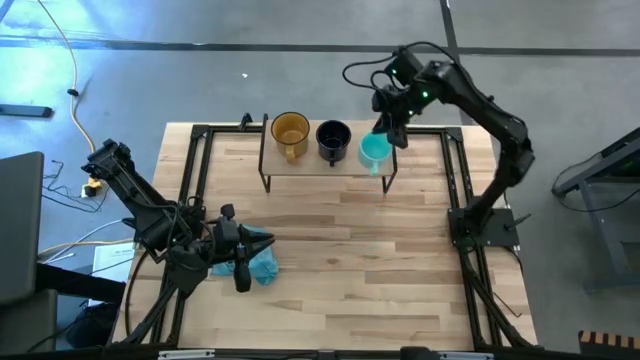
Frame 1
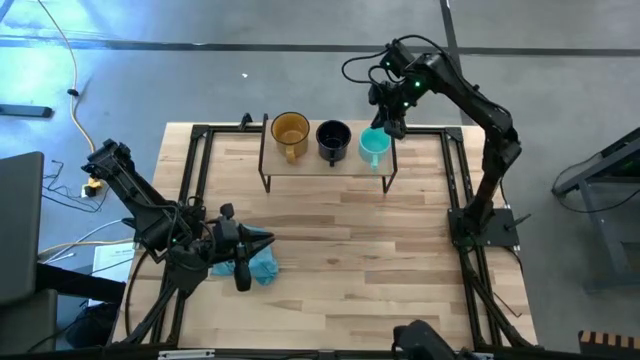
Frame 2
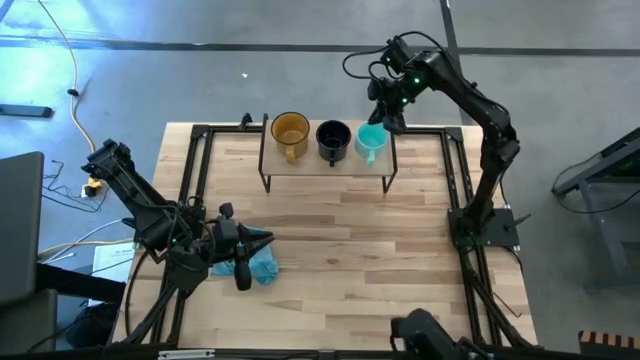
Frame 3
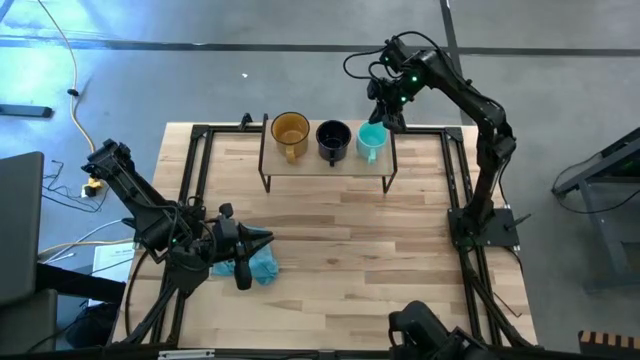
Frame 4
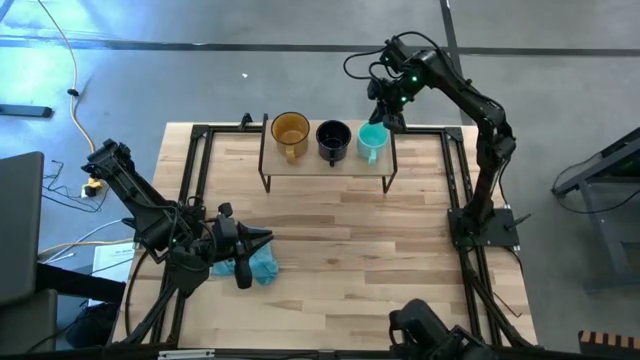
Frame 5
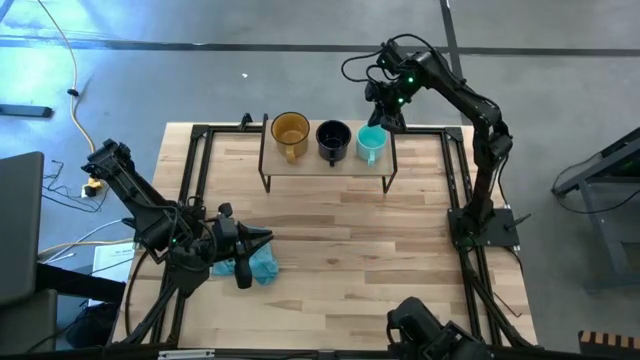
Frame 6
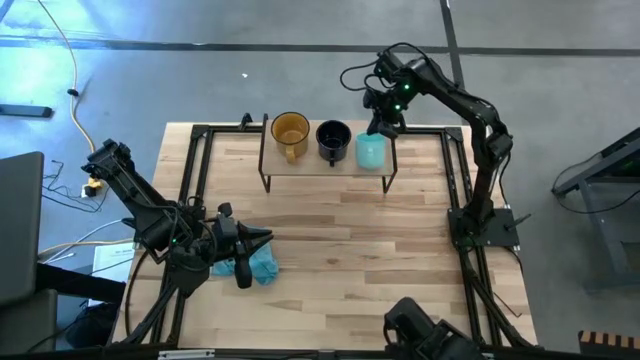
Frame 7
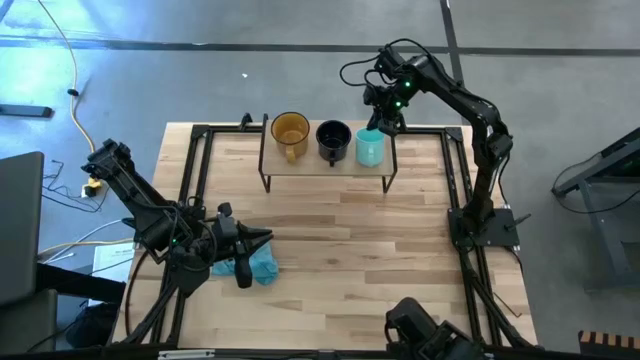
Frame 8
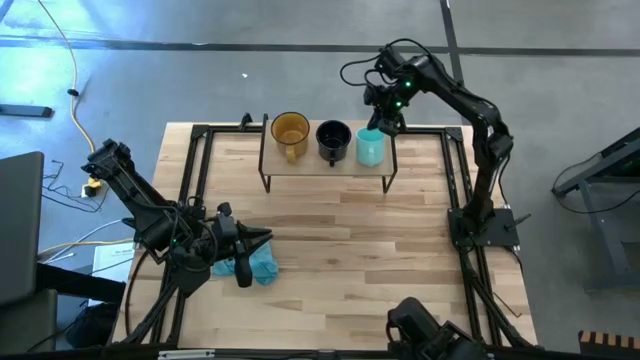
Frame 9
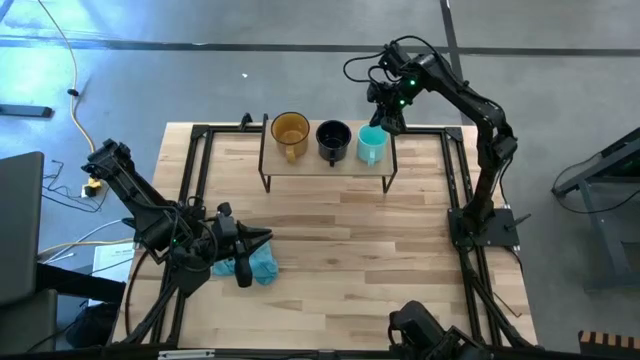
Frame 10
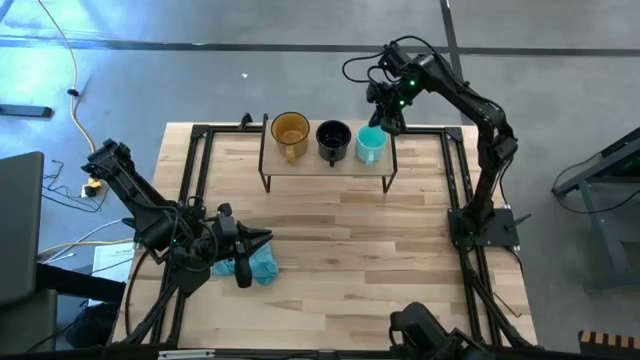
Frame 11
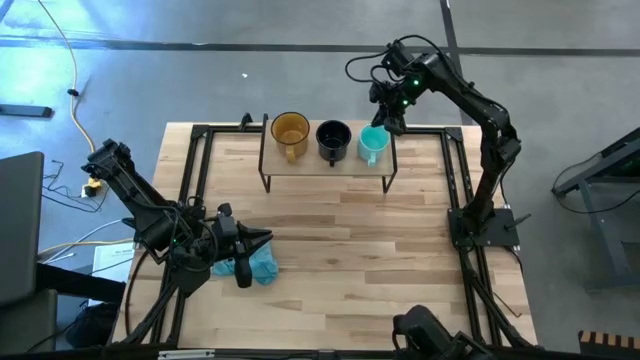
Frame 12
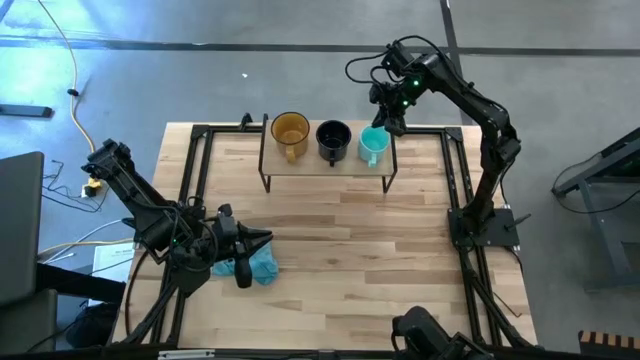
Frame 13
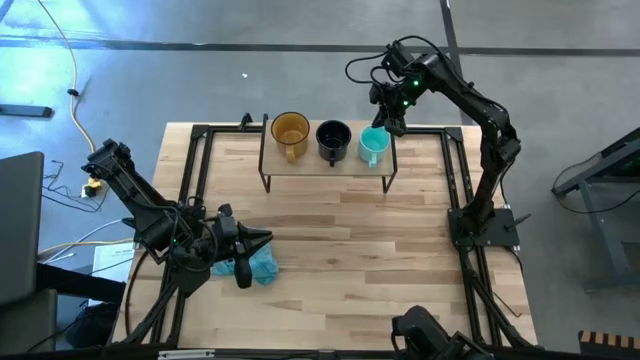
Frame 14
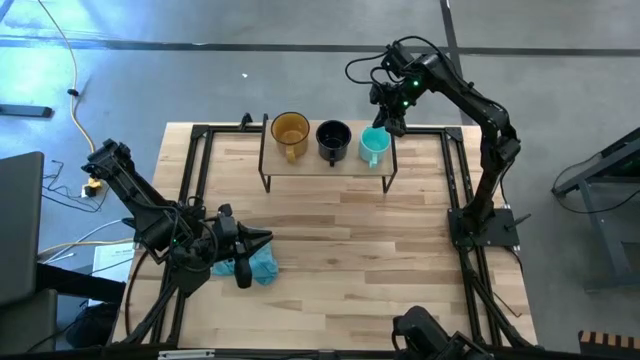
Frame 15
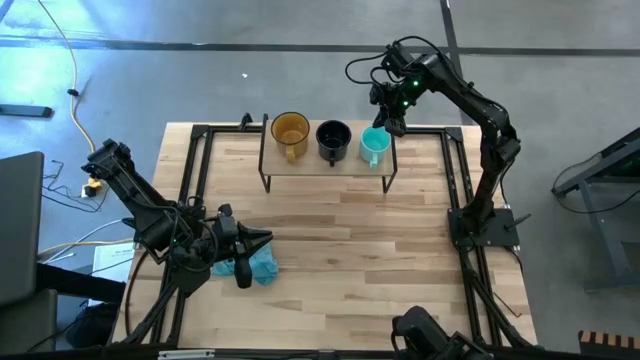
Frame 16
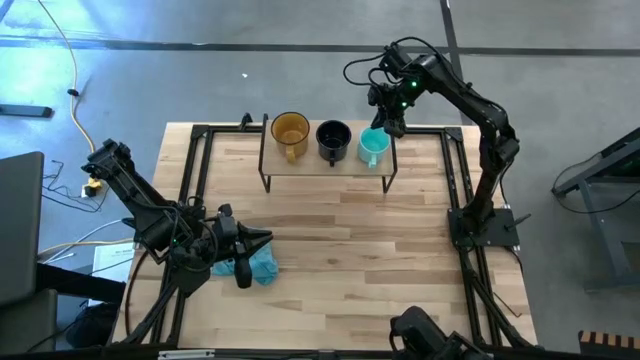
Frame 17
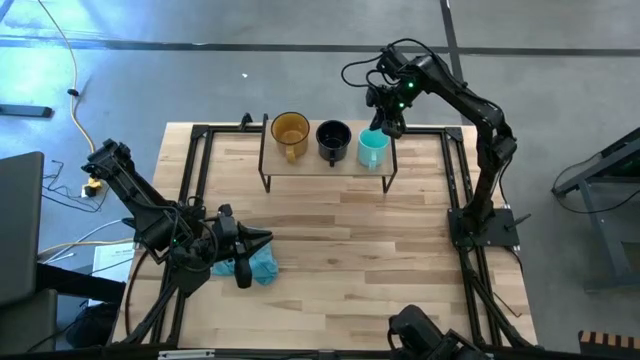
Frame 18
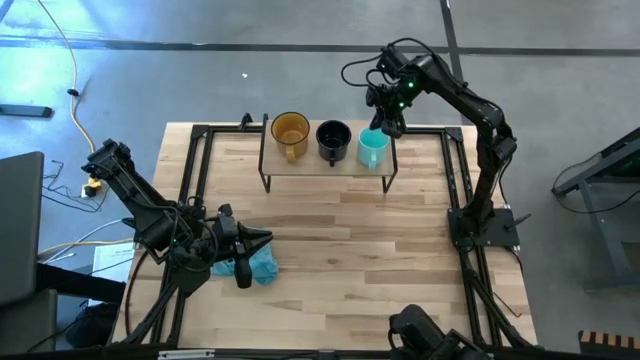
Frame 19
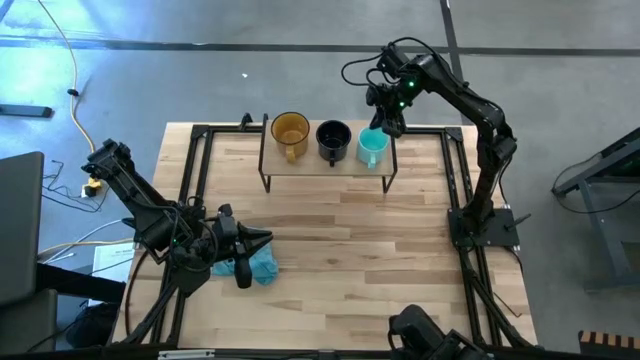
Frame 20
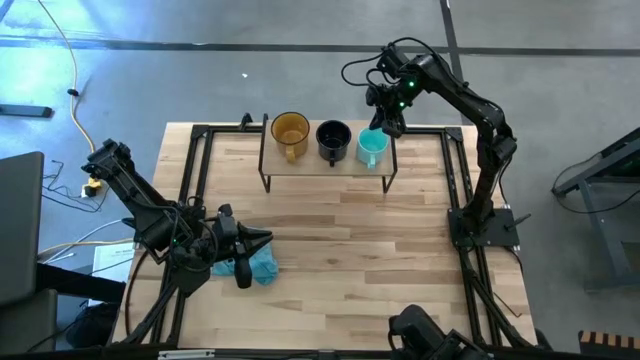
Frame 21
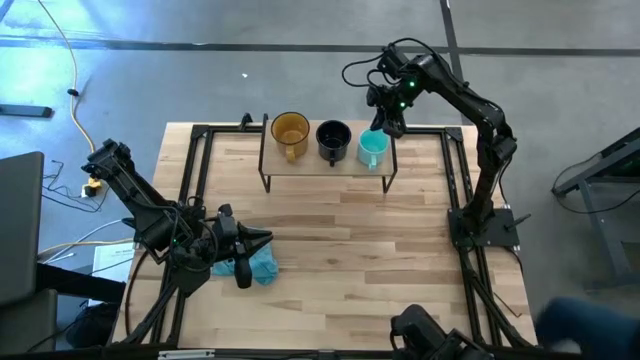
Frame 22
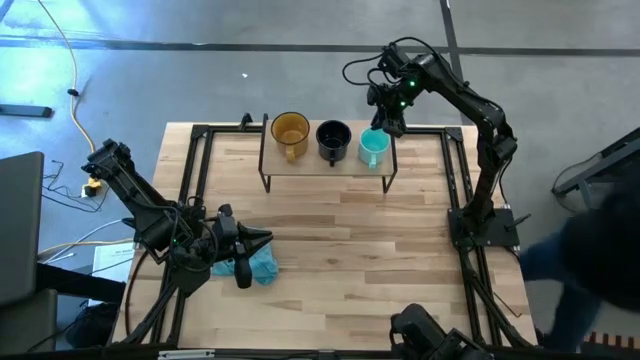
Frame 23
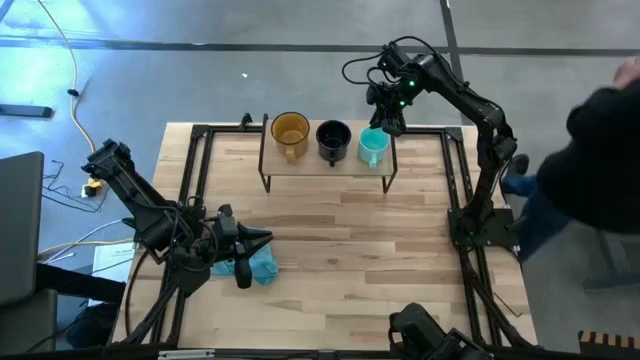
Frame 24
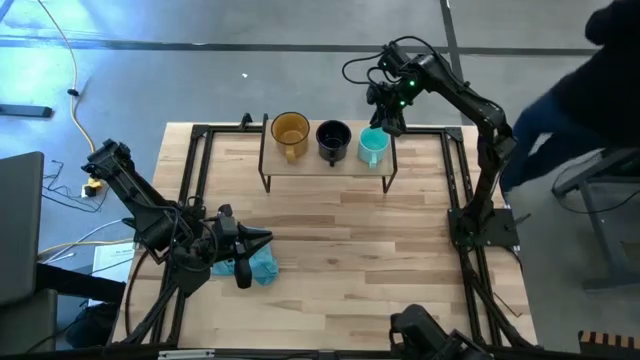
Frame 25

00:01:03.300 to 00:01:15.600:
Task: Stack small to large cups/mugs on shelf
Put the light blue cup on the shelf

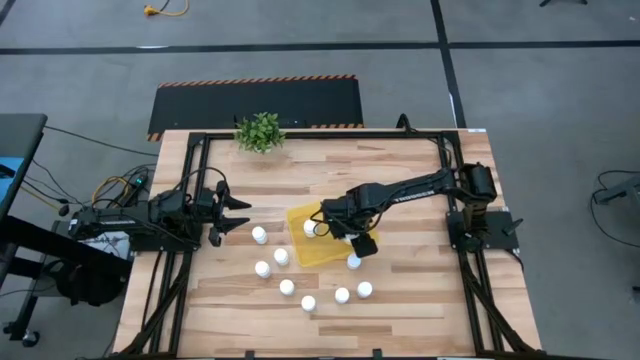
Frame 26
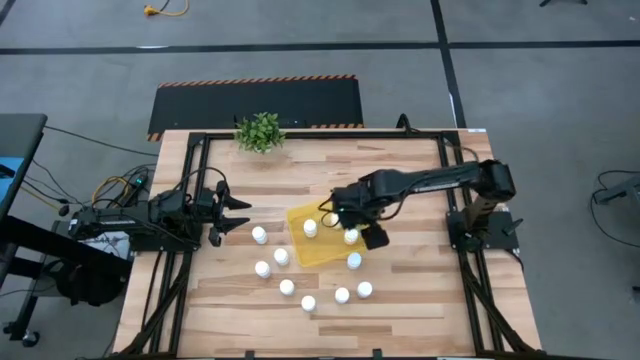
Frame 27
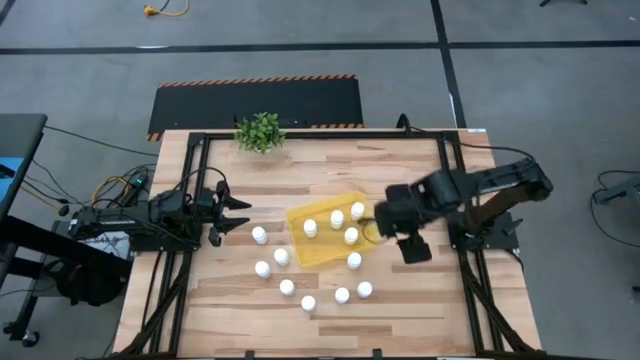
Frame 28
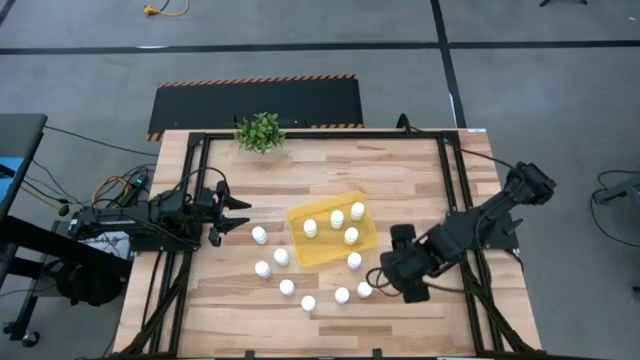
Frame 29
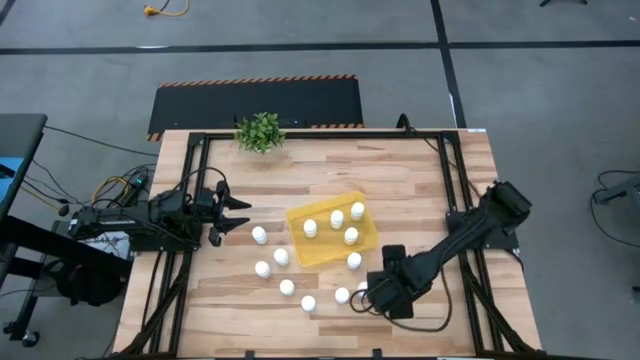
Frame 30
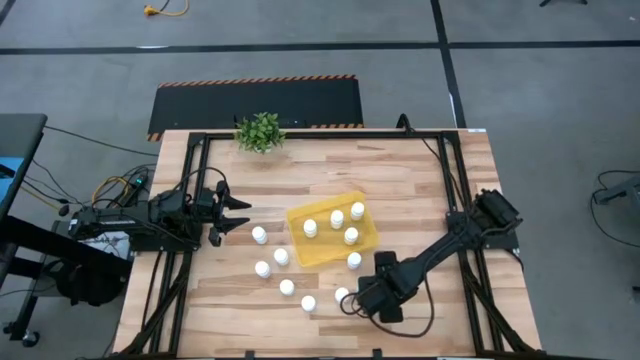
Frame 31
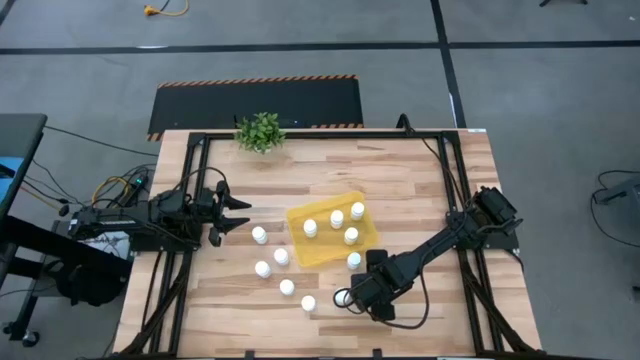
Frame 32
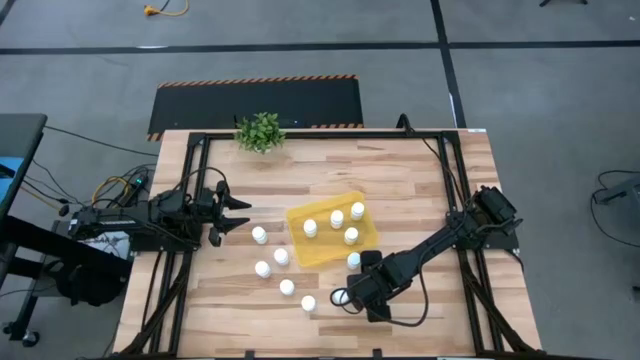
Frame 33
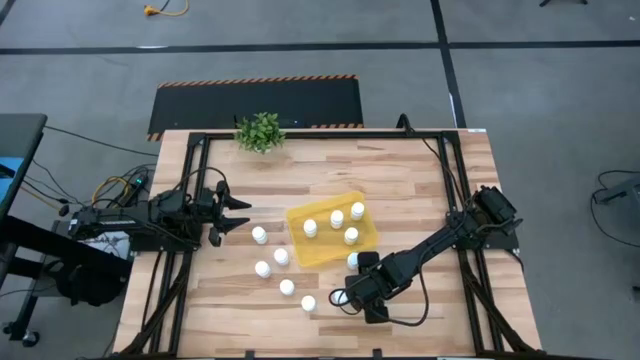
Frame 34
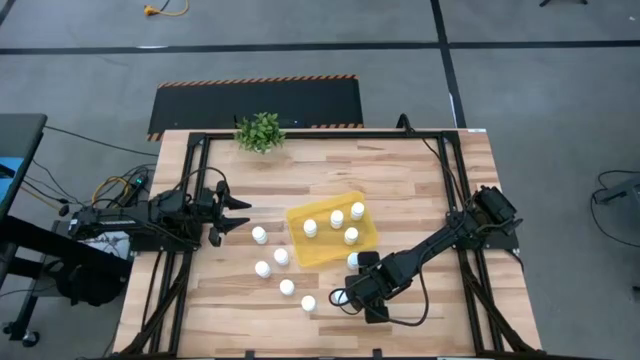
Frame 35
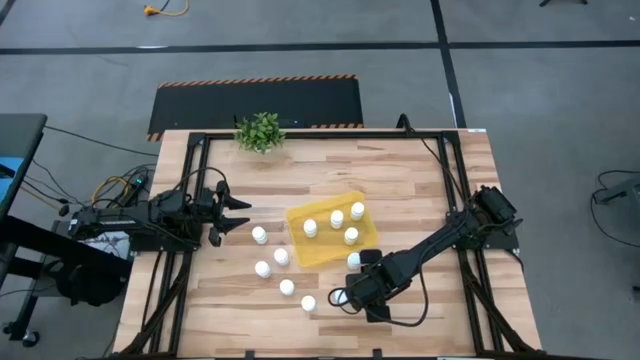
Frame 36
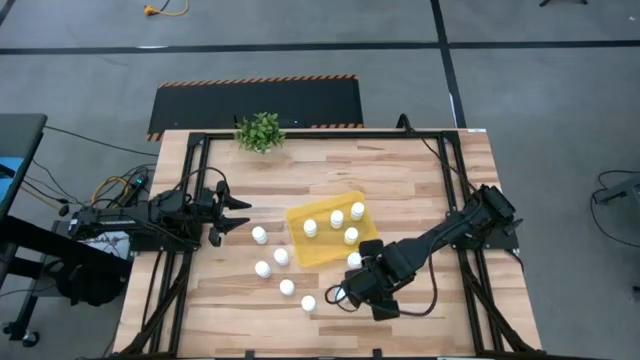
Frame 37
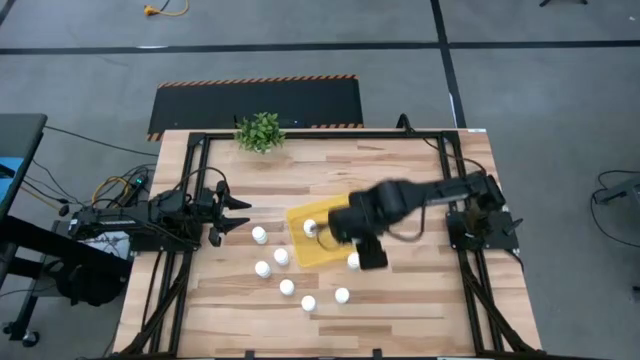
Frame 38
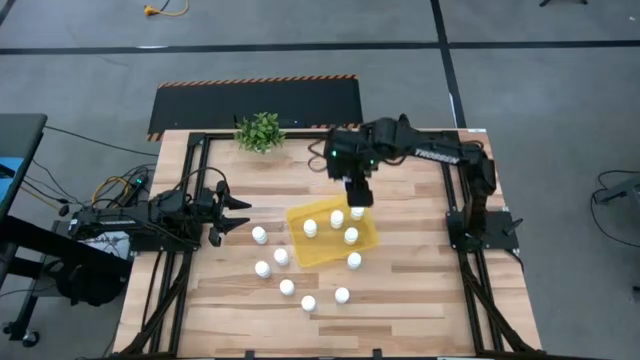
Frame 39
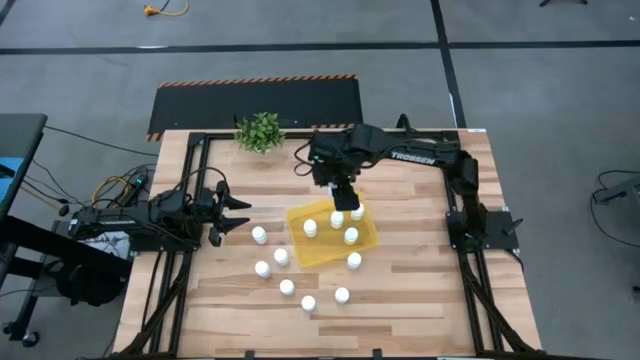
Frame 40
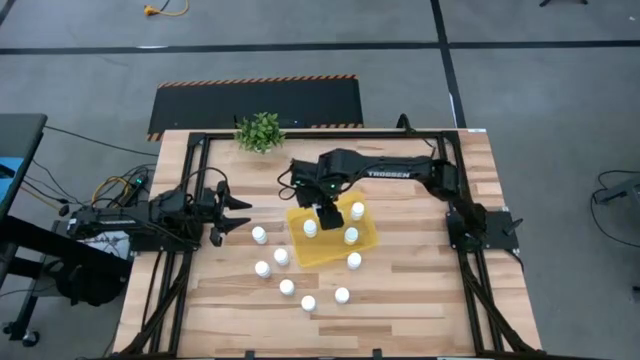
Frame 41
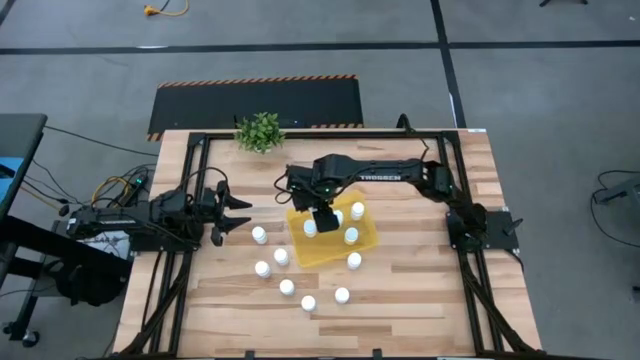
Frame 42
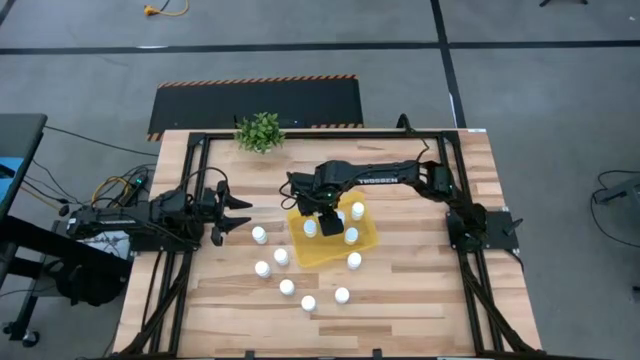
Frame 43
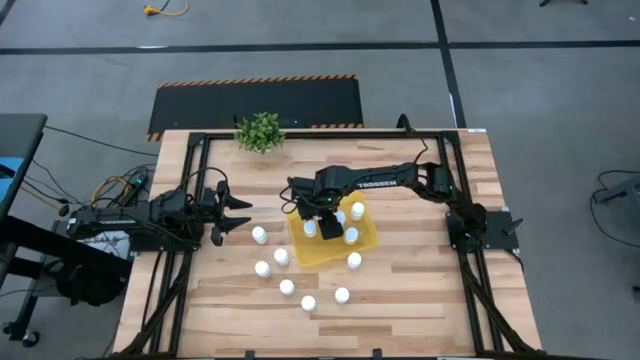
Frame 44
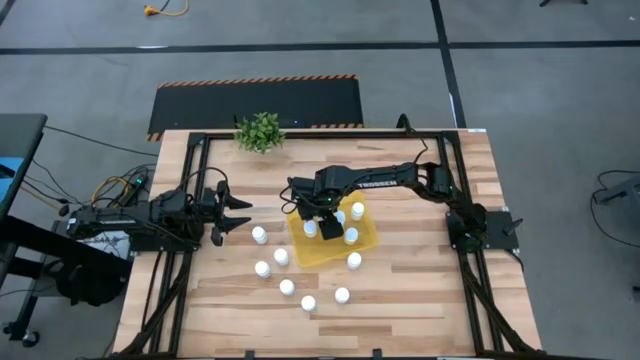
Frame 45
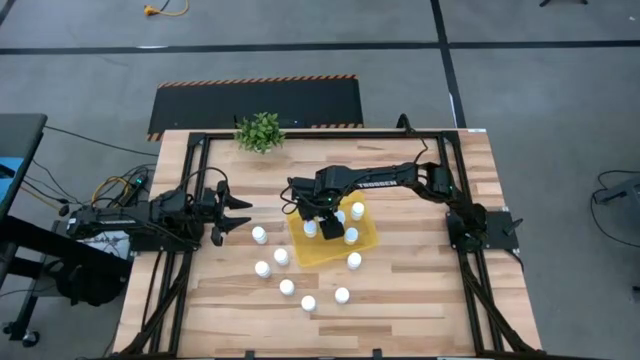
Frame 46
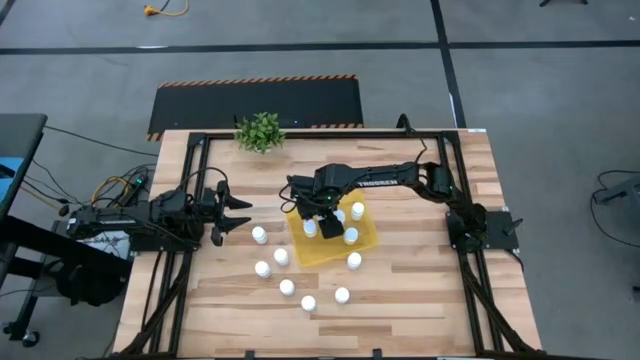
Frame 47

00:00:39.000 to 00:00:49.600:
Task: Pick and place pill bottles into a basket
Put the white pill bottle into the yellow bin
